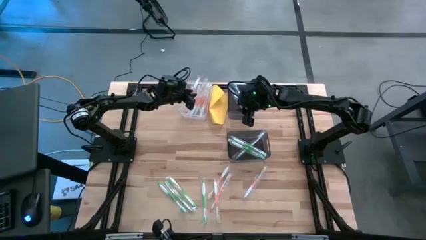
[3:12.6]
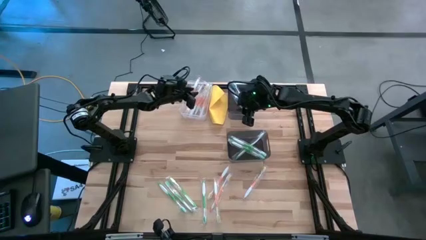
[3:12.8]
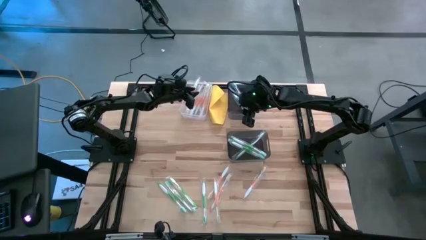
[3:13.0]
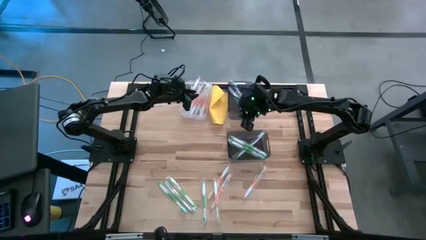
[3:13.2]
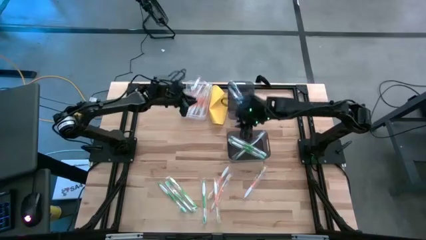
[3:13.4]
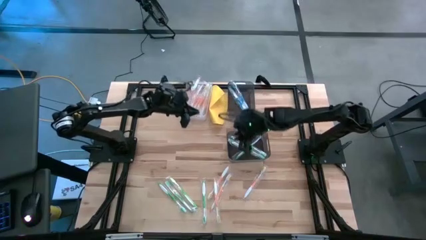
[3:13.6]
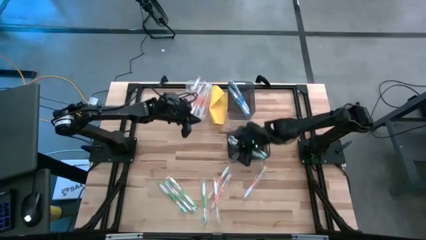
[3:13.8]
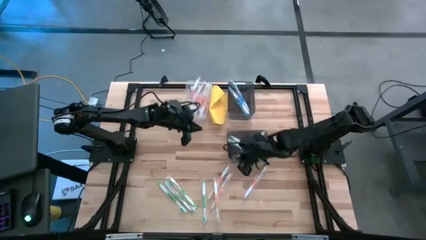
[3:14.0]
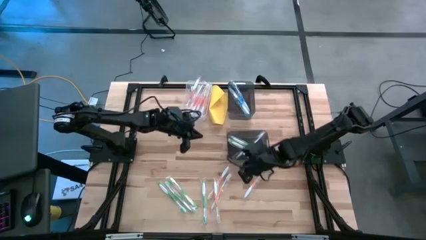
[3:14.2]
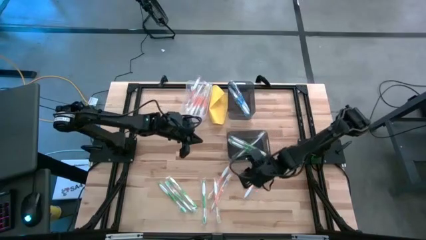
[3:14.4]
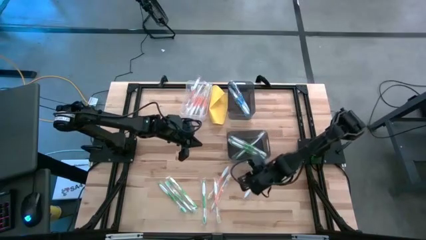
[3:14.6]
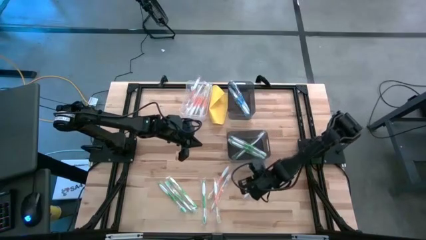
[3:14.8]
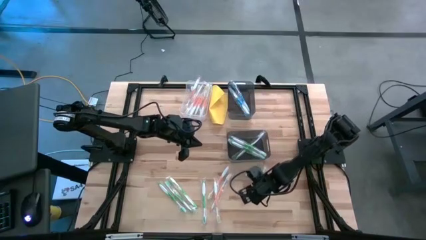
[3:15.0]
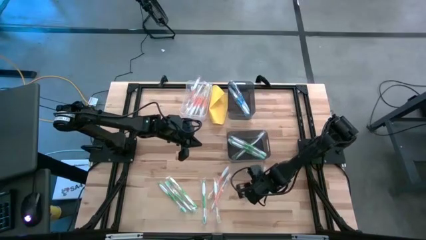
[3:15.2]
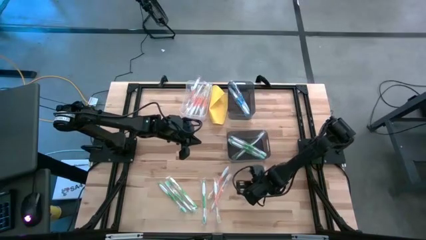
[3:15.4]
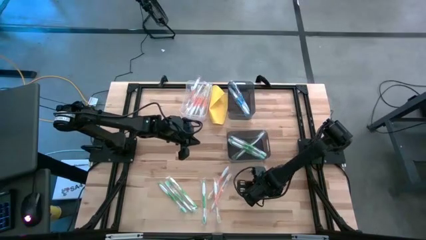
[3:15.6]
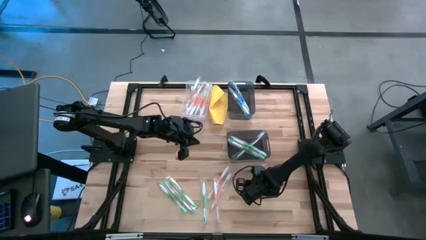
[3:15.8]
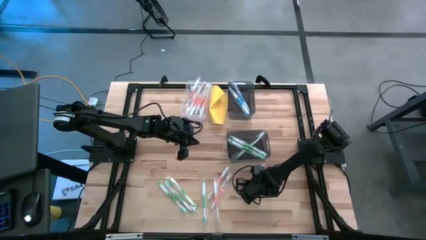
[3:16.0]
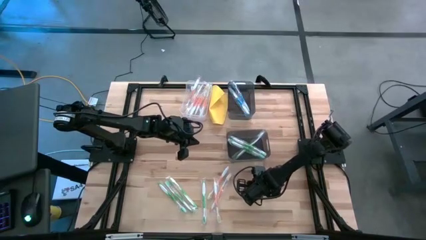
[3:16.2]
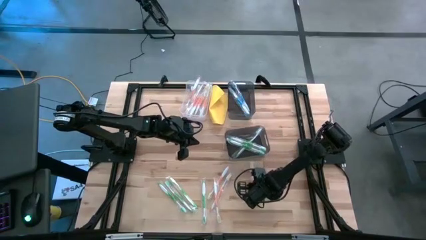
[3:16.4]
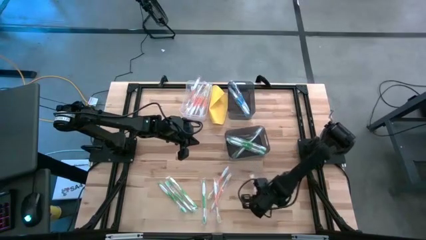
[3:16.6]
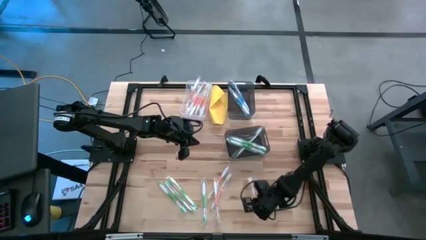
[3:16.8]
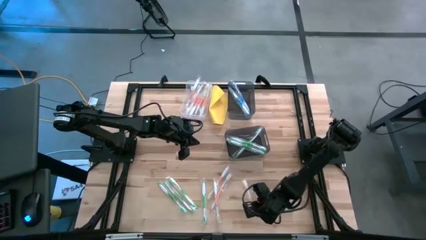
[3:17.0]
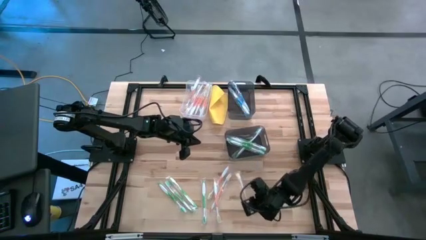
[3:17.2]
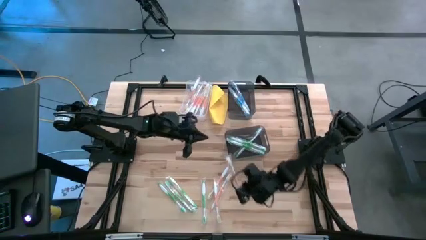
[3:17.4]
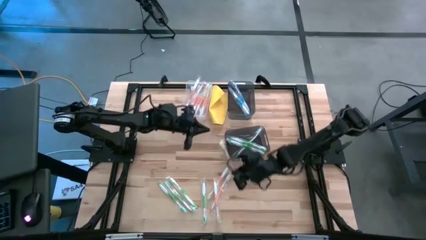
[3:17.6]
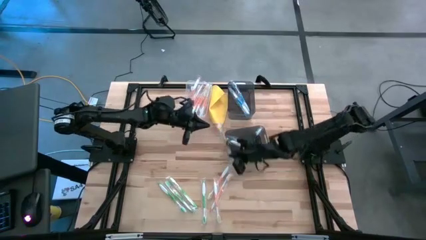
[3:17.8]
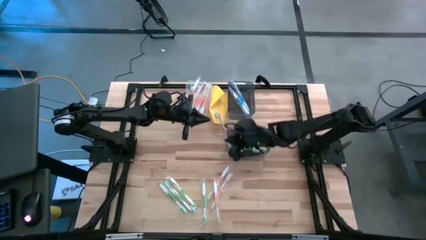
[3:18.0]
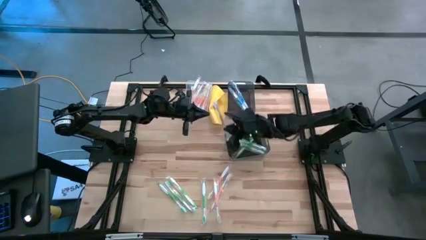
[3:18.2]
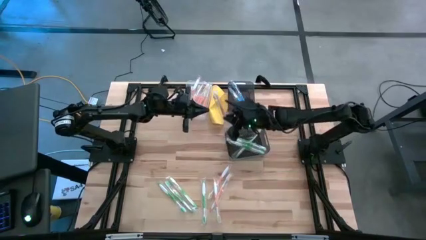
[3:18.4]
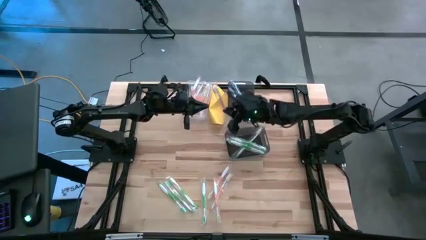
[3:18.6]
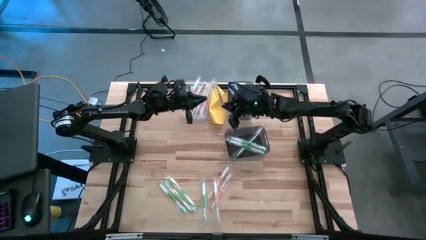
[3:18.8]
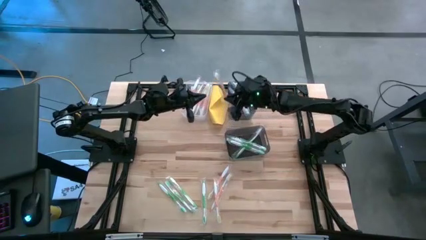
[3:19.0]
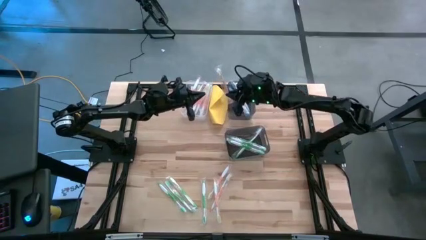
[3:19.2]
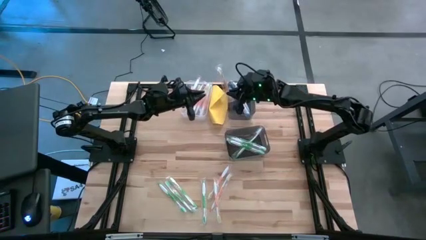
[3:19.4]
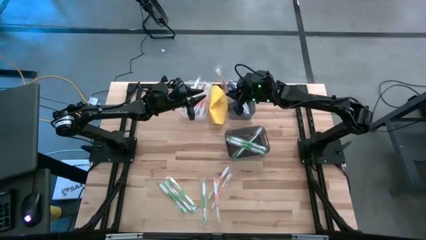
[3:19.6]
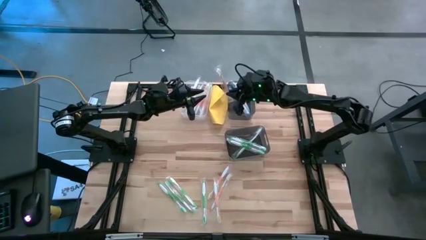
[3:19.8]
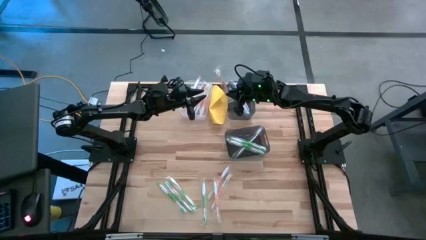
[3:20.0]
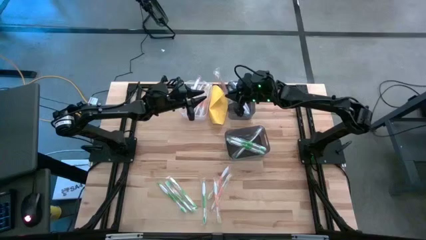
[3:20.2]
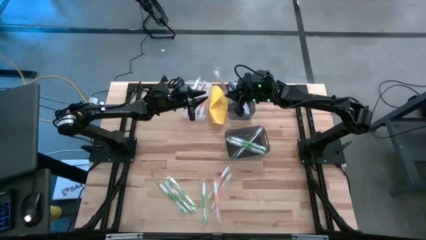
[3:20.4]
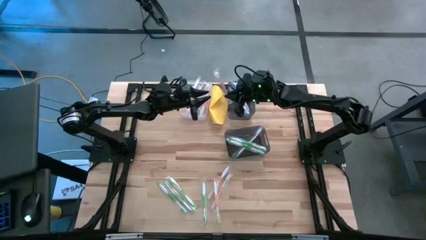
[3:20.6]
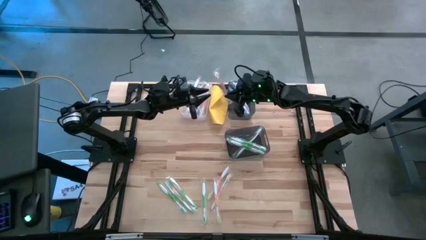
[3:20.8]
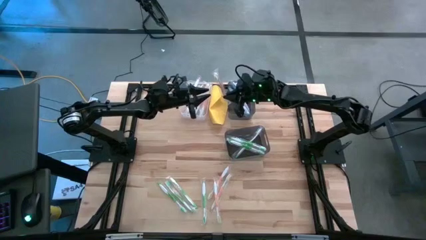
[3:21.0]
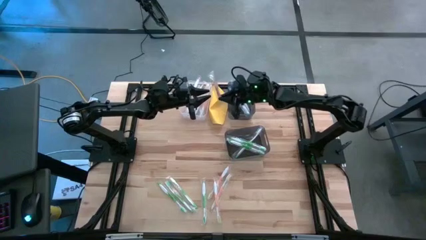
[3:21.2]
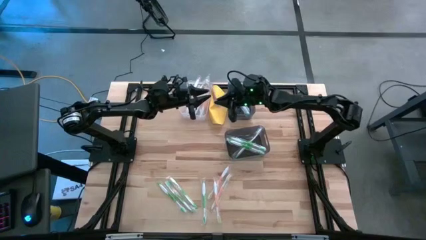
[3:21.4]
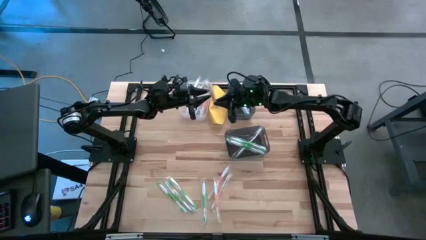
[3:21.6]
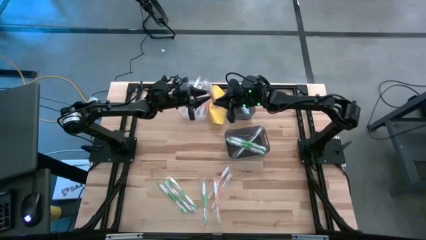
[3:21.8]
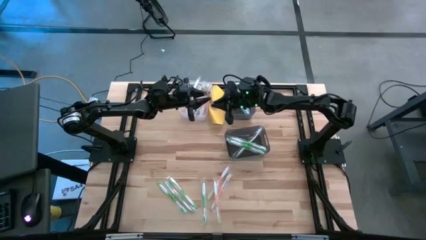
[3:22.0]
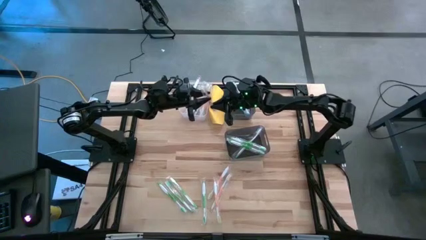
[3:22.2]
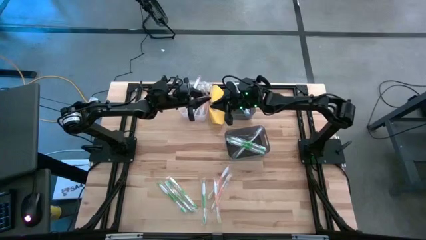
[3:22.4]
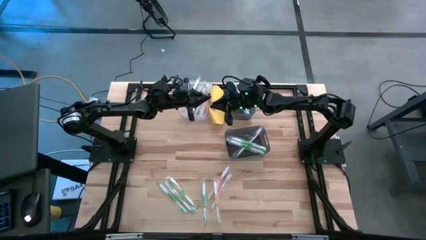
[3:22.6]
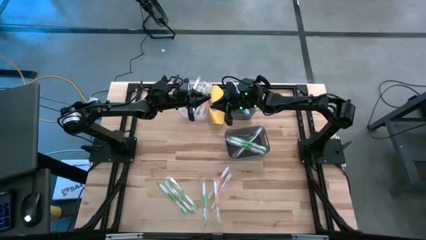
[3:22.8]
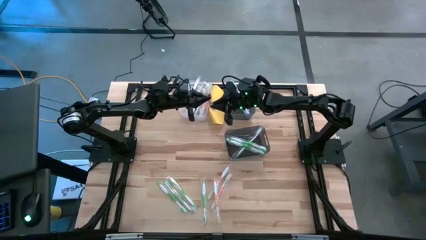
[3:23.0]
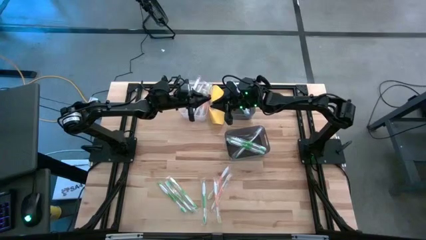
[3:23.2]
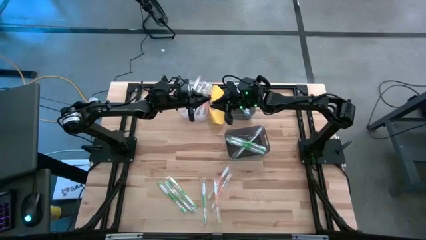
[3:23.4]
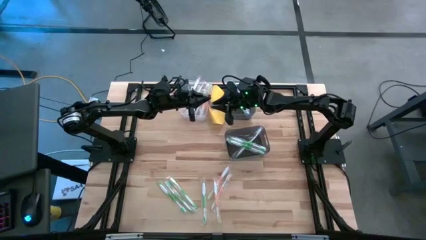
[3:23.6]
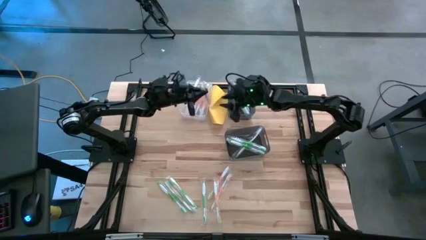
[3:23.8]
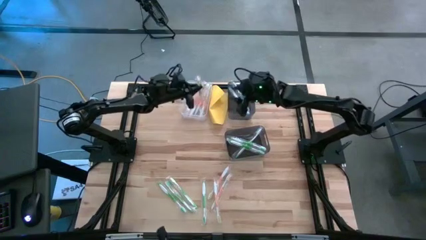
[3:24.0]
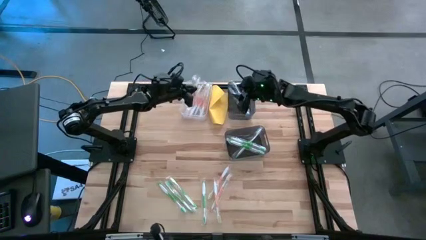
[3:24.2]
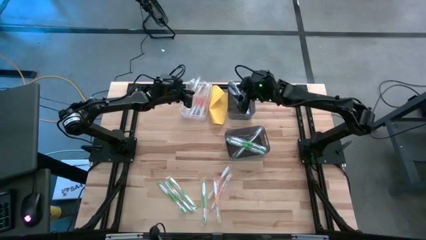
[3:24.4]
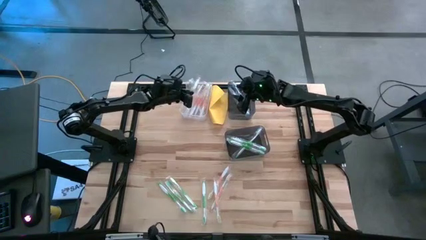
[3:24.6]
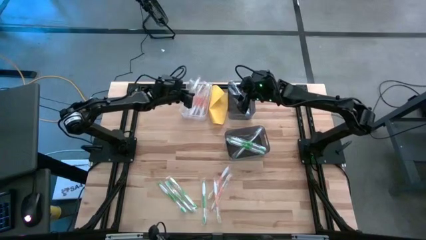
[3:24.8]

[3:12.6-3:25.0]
Task: Pick & Place Toothbrushes
Put the orange toothbrush into the transparent bin

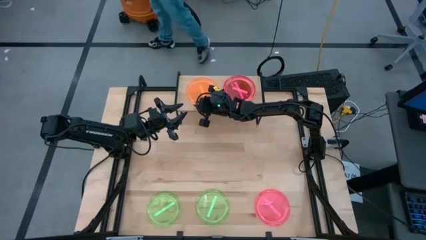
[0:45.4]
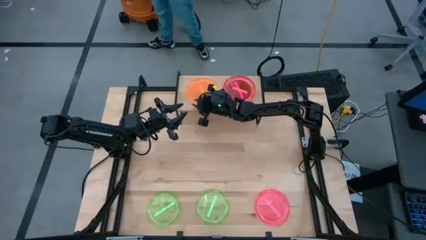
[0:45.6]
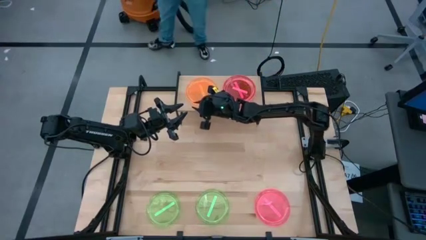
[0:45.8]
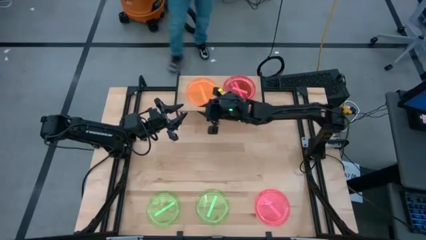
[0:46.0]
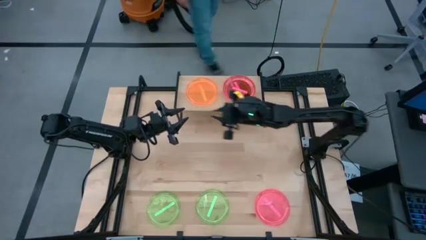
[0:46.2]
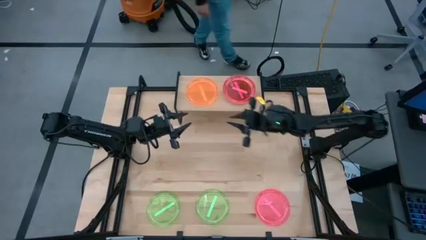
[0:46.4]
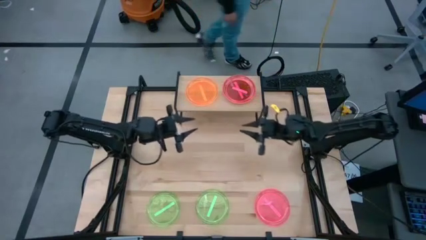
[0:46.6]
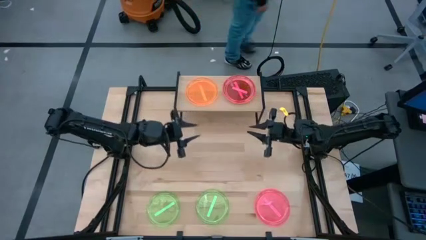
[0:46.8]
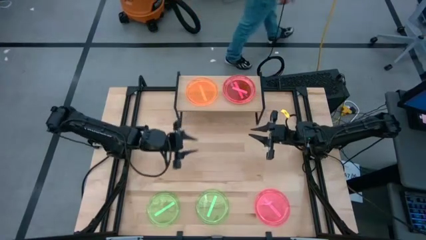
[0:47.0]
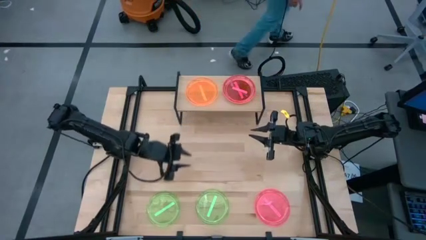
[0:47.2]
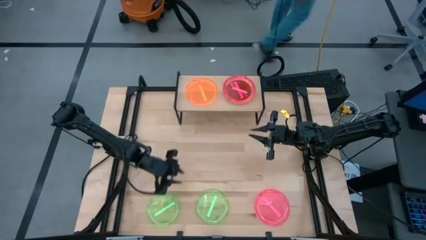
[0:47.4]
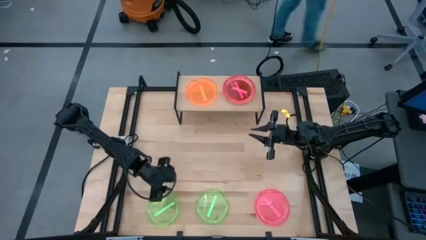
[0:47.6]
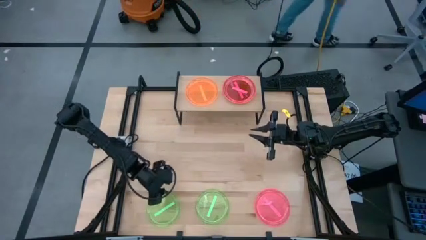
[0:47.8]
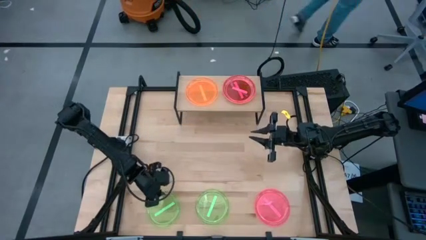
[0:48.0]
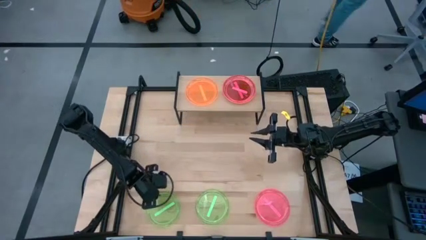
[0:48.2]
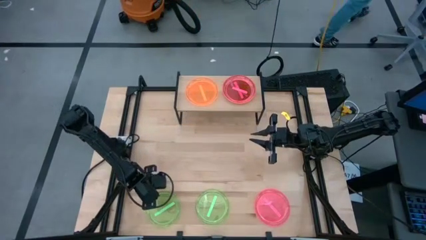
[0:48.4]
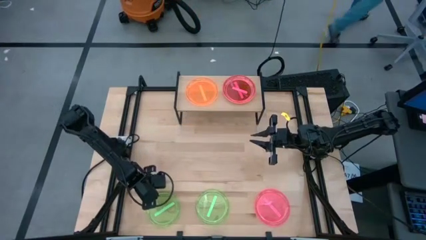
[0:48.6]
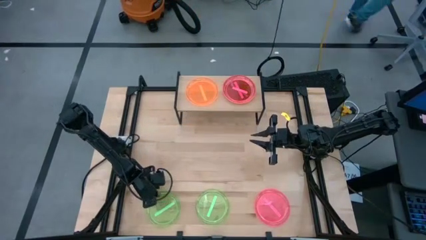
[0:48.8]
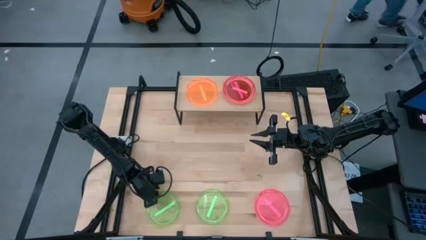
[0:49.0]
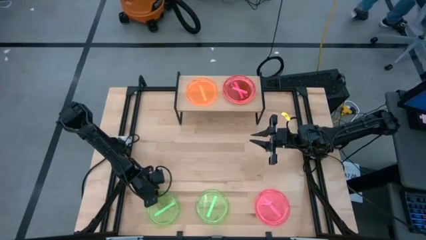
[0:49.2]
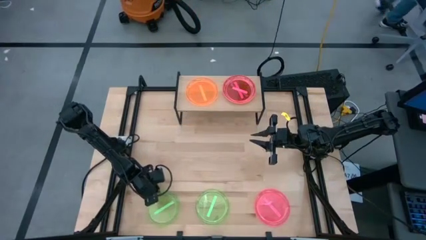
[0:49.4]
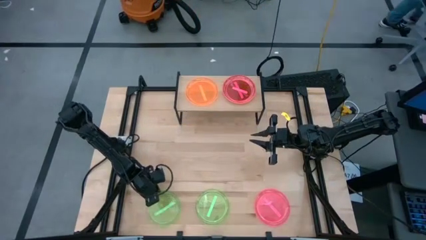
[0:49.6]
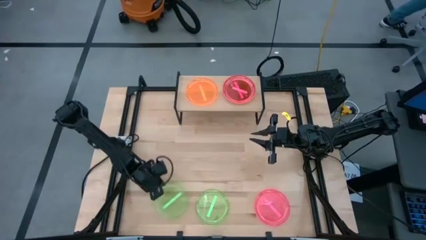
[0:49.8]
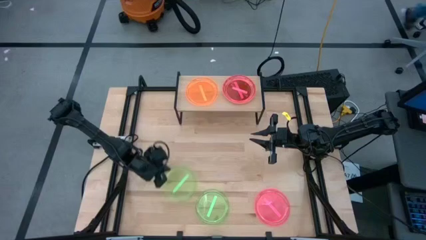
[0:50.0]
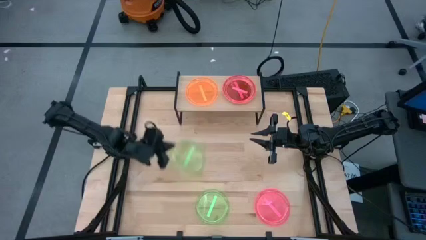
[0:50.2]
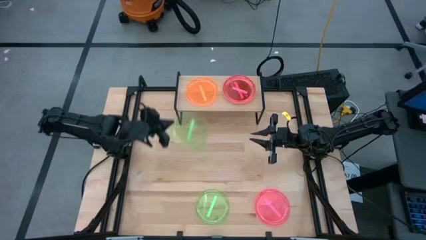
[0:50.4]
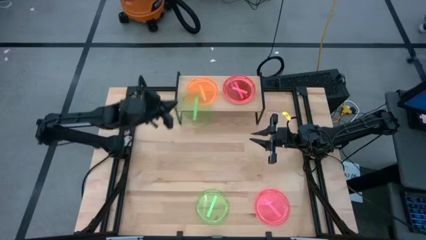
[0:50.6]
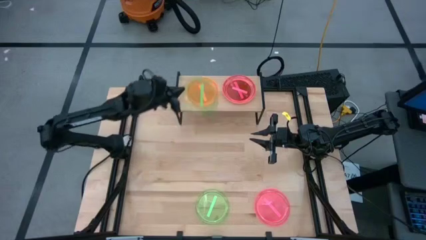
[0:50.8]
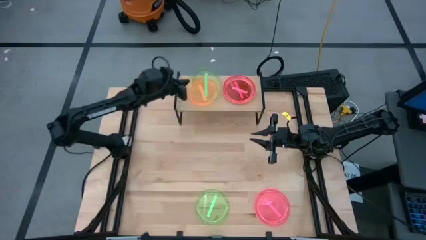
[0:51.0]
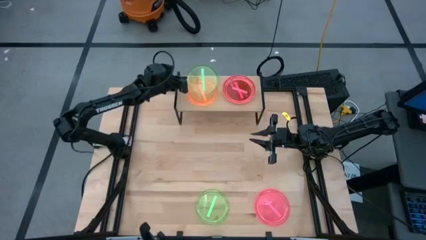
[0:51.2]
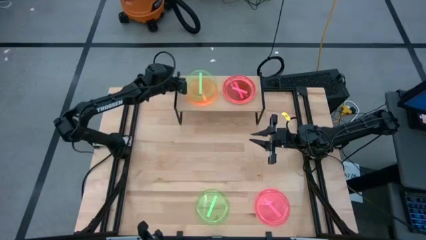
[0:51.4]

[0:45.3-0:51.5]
Task: Place and stack plates onto a shelf
Stack the green plate on top of the orange plate on the shelf
